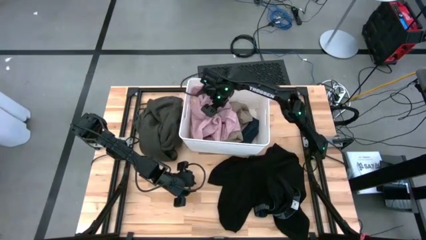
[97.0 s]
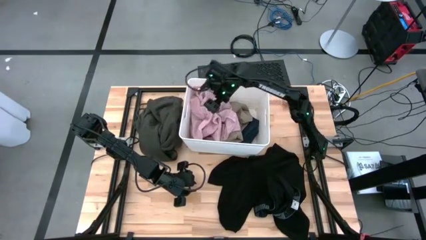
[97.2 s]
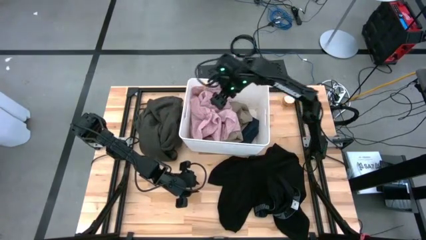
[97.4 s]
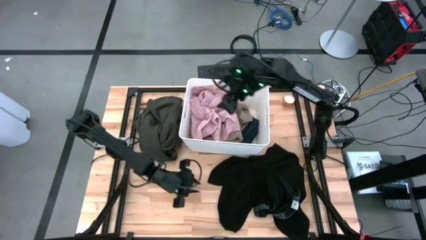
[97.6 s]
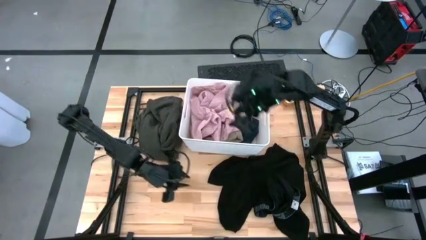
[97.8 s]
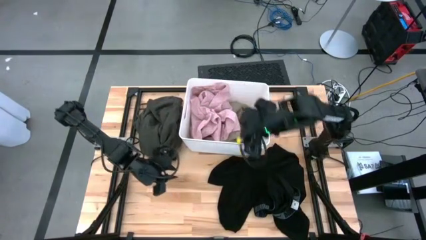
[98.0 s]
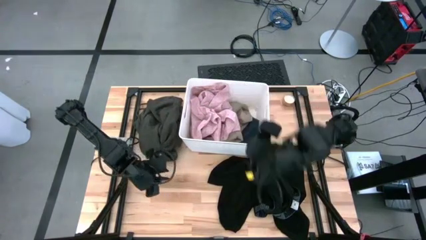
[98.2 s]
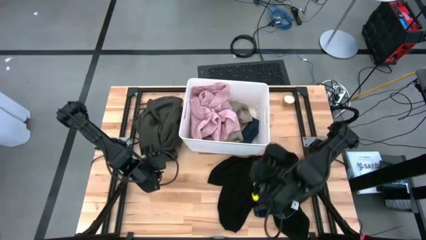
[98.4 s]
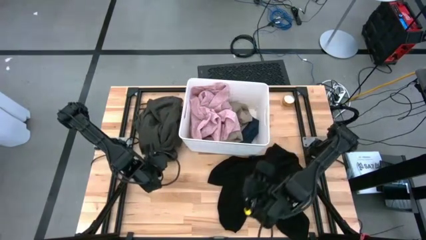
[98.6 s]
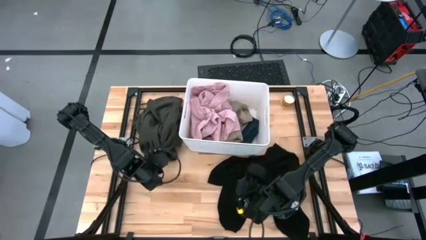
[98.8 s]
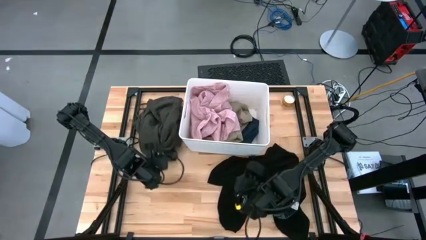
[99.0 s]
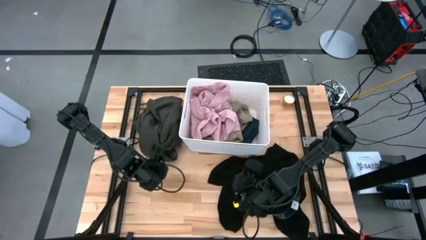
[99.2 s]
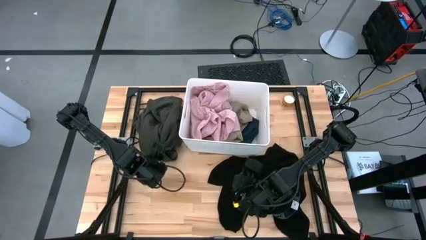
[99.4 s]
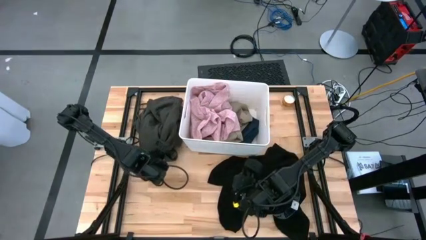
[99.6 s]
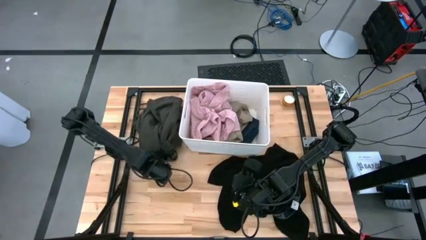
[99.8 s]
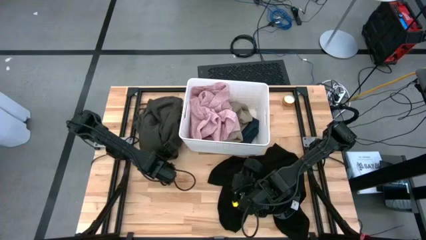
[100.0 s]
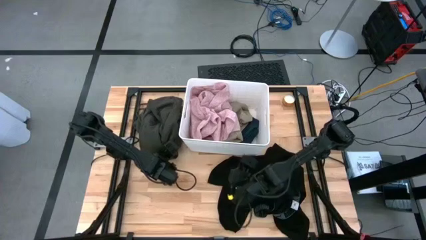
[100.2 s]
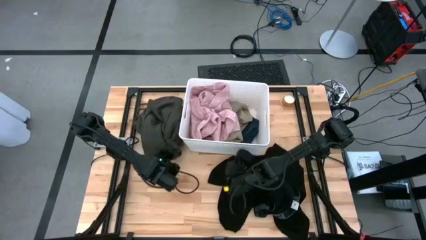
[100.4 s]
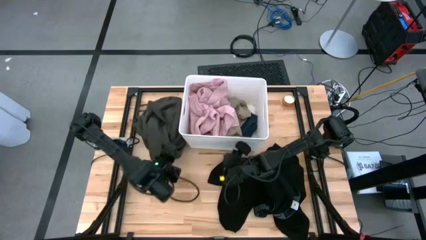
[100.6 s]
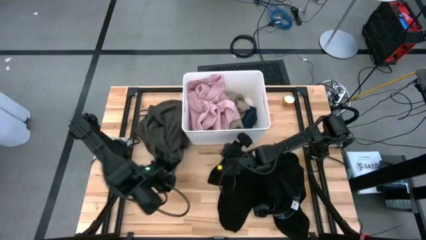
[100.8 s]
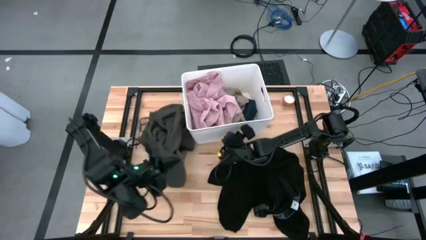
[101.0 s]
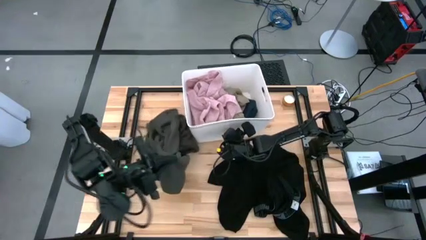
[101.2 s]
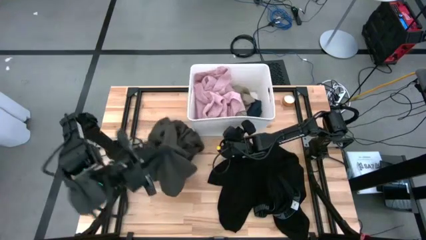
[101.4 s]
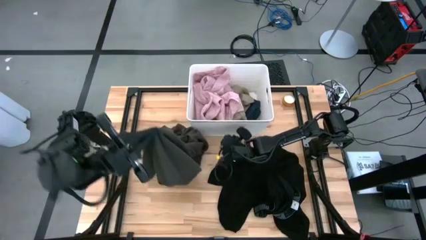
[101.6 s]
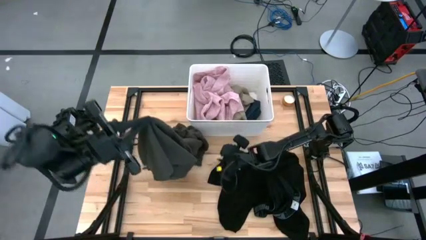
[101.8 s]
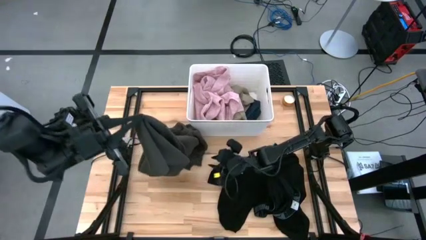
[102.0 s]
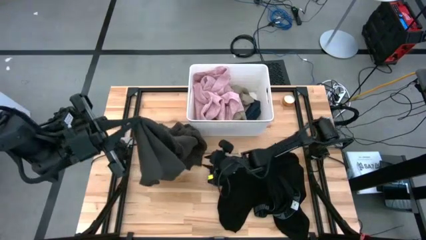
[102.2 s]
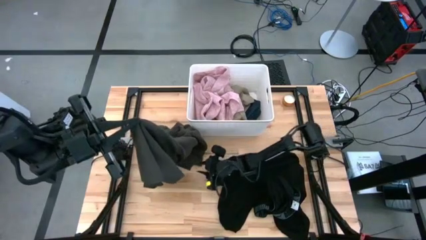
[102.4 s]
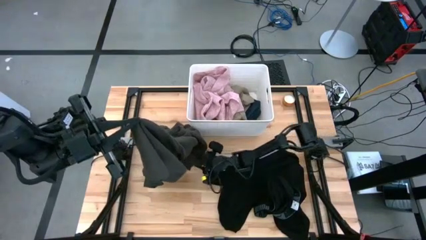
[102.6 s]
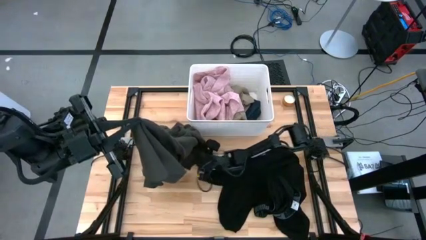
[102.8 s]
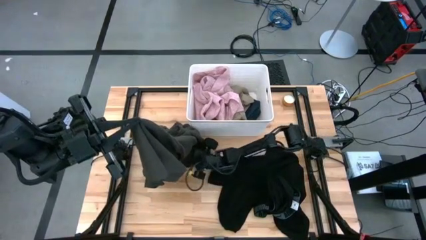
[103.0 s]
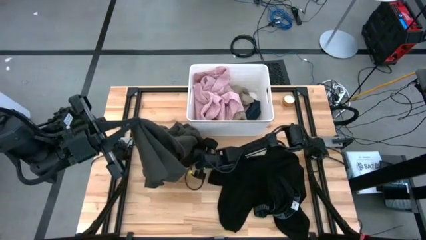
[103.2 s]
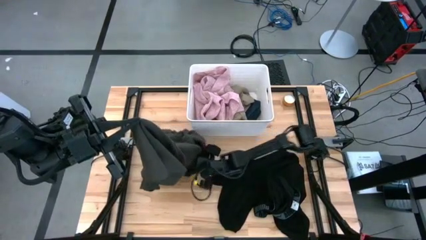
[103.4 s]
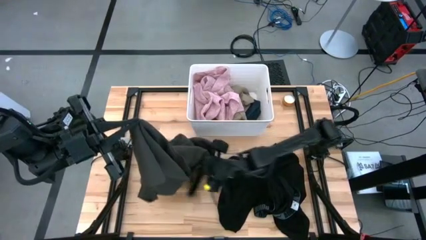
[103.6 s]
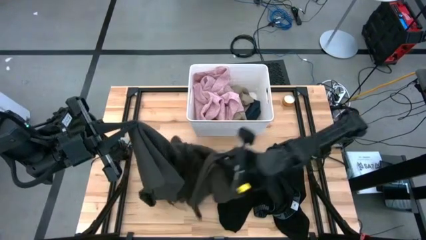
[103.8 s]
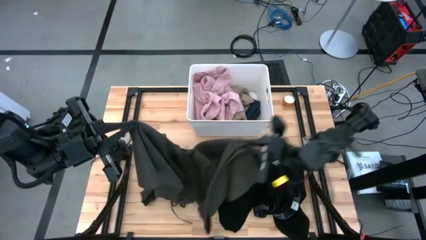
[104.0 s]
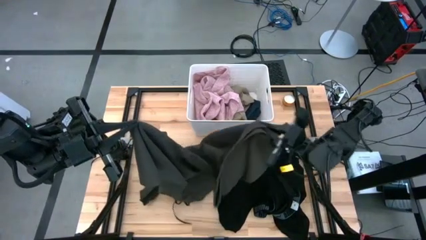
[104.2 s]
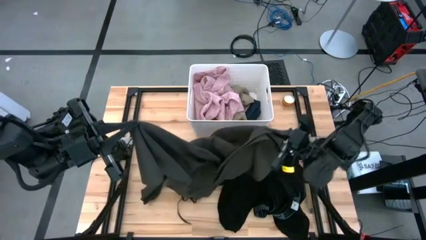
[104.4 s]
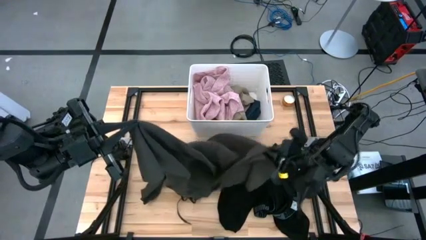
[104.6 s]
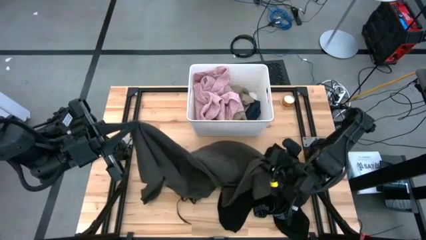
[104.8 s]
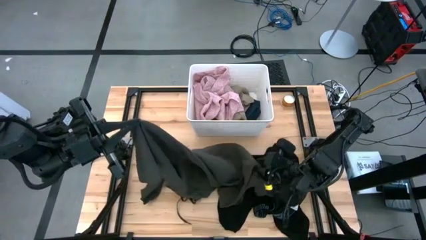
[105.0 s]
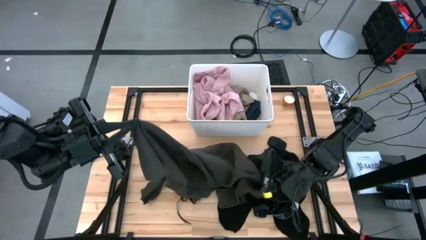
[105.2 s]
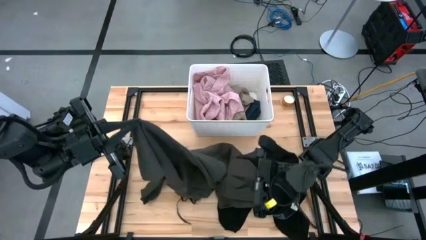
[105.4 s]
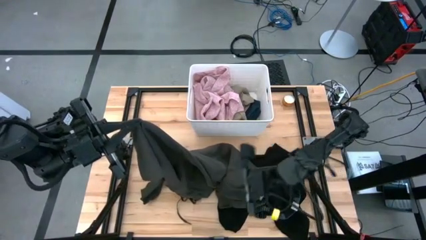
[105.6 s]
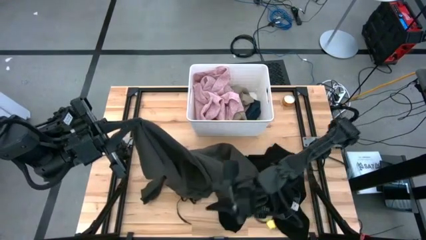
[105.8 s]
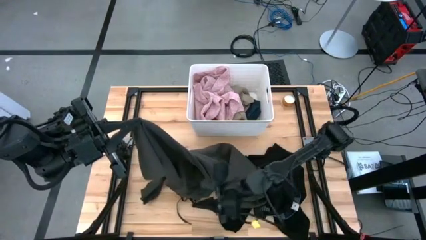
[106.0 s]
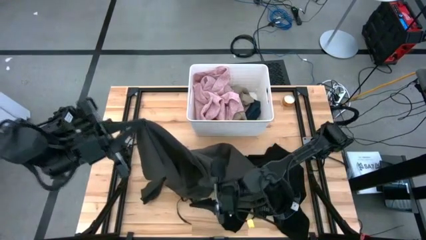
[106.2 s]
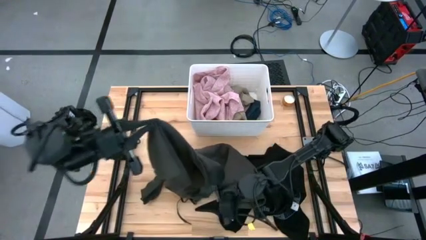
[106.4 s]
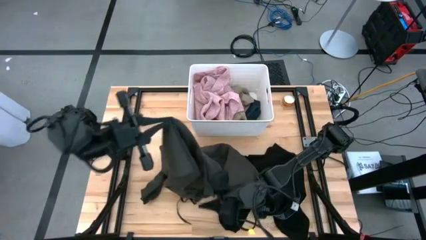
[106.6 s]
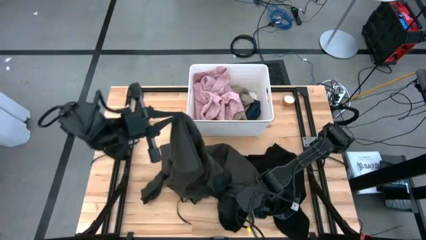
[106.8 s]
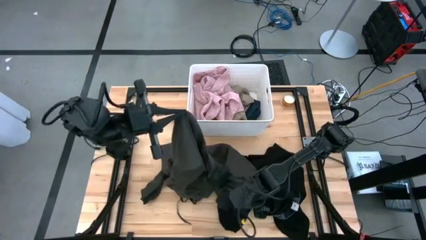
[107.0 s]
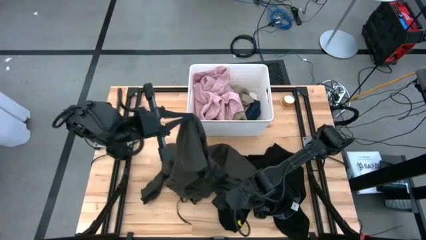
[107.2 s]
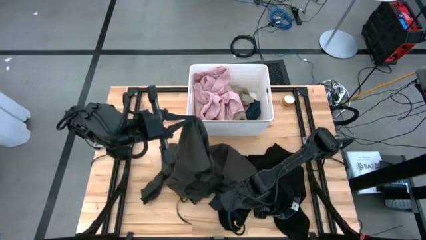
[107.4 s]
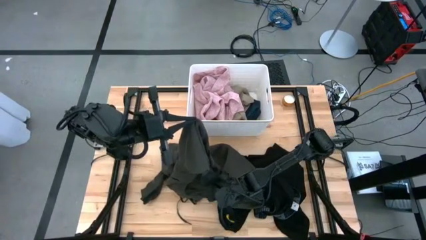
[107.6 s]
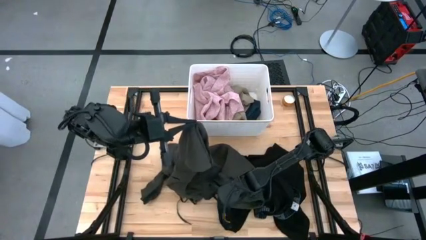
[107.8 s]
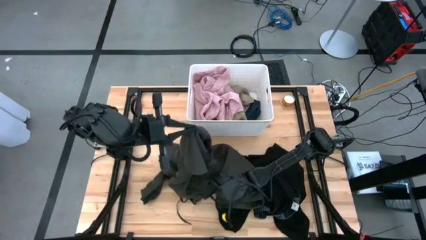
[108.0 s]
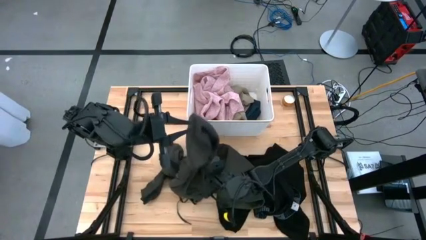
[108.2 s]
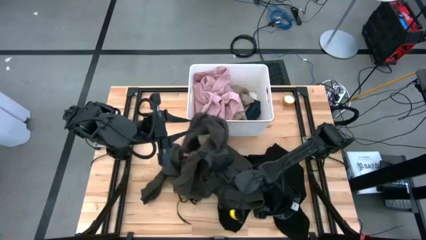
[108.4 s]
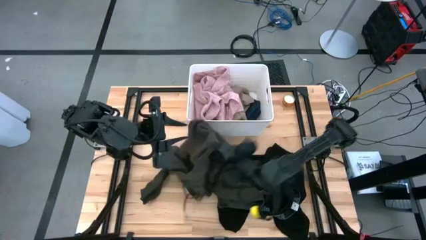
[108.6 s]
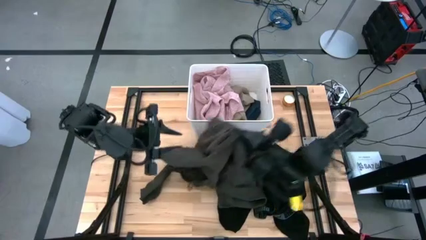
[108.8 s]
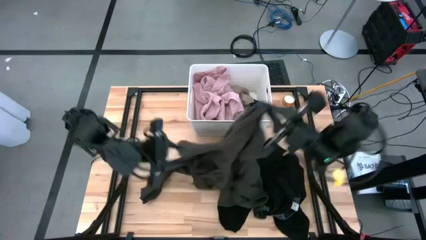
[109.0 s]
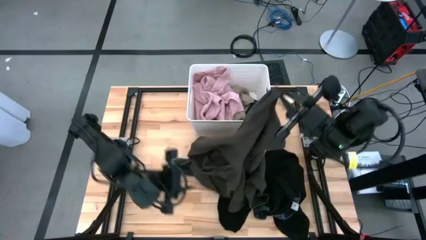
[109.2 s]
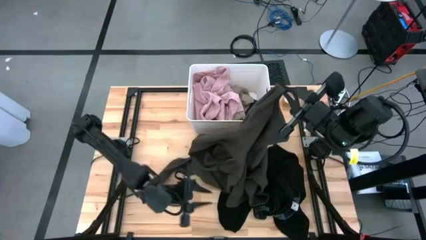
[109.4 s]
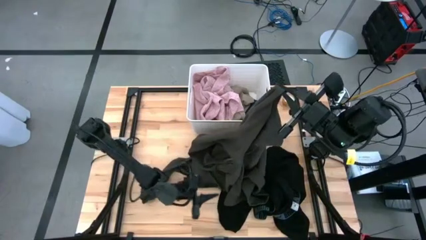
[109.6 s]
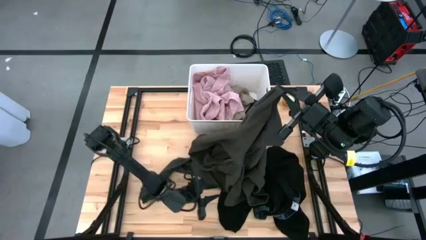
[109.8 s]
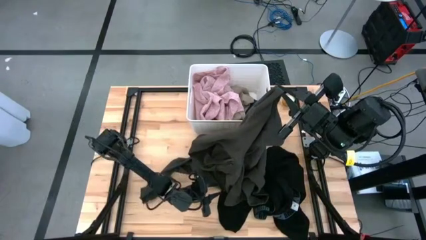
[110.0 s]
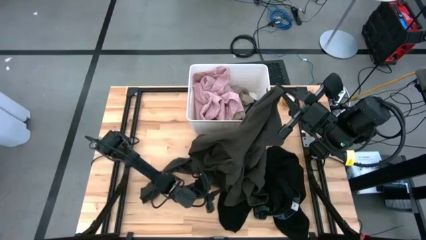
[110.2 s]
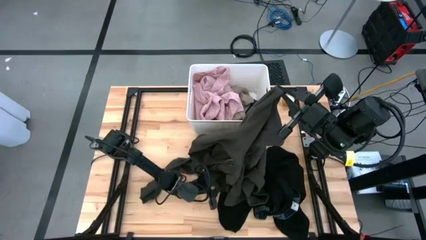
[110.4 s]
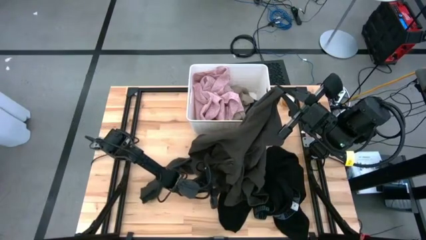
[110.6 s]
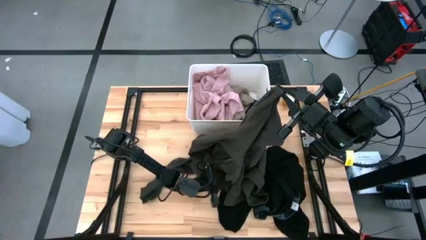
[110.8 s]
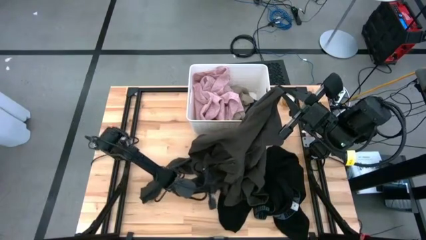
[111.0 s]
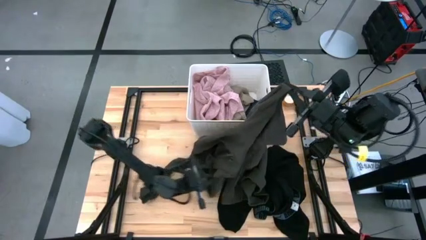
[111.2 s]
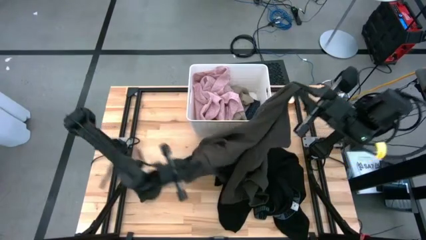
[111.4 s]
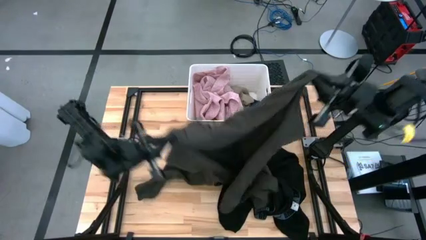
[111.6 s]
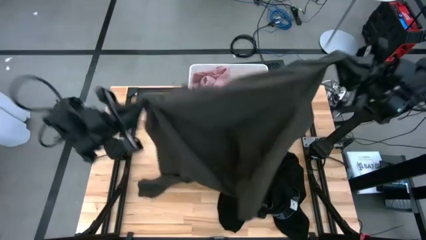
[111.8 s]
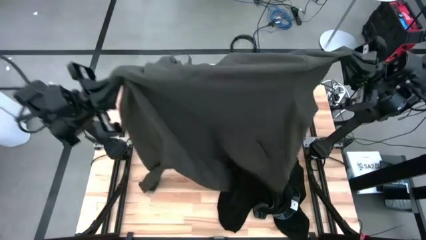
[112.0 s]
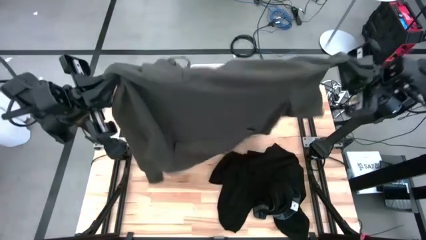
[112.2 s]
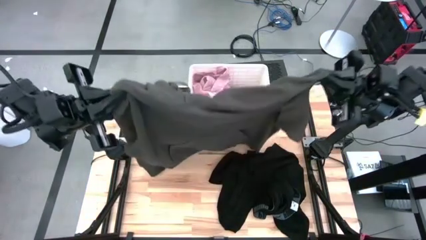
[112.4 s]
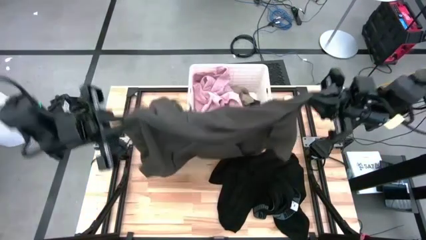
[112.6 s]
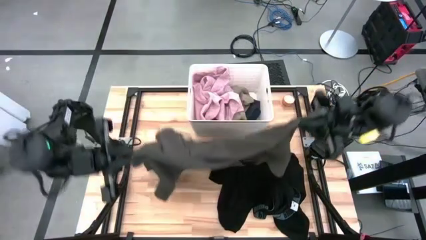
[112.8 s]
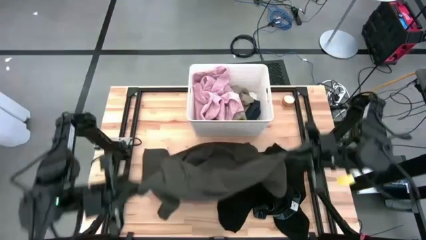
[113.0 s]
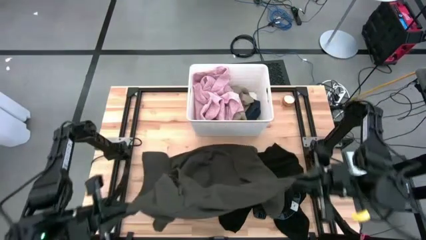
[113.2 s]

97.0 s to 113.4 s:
Task: Sort clothes
Fold the gray jacket
